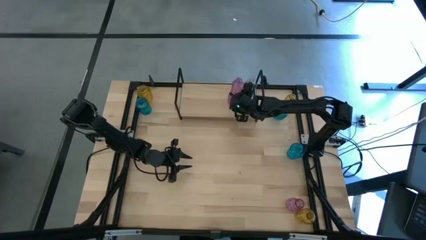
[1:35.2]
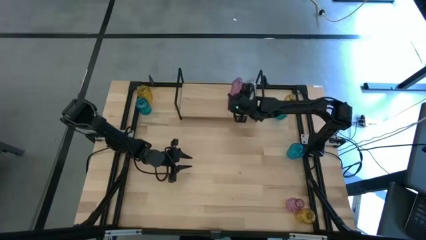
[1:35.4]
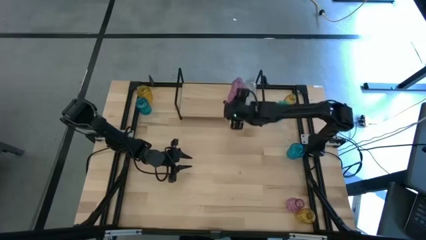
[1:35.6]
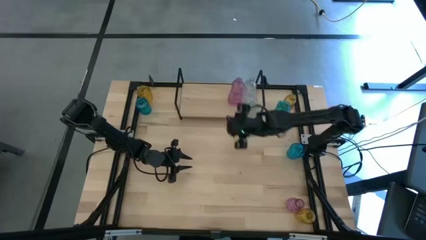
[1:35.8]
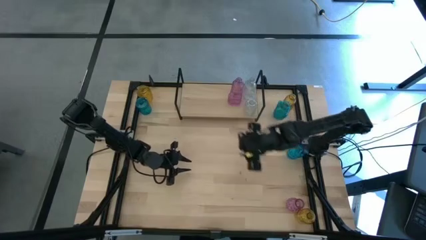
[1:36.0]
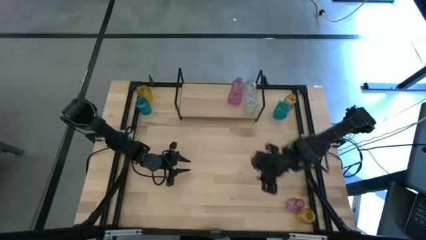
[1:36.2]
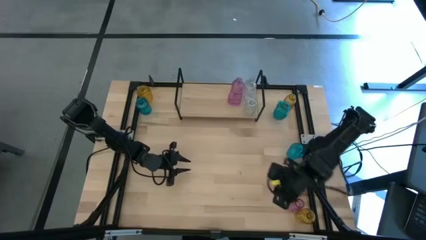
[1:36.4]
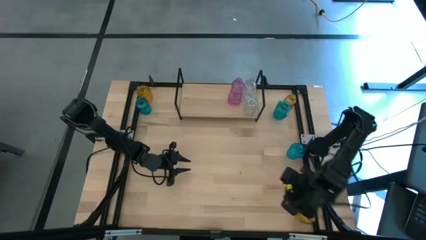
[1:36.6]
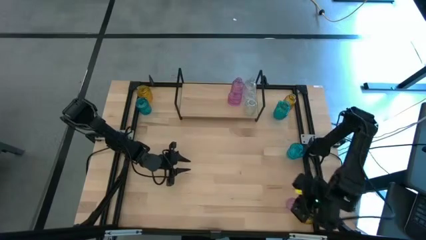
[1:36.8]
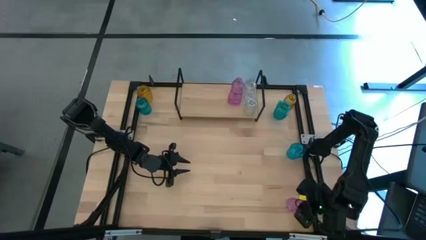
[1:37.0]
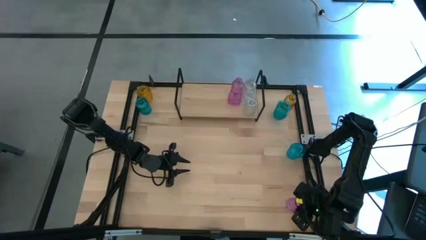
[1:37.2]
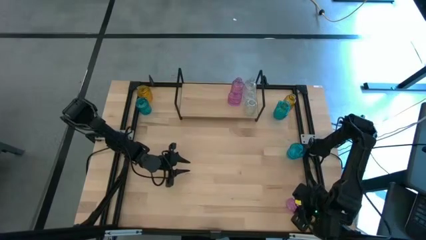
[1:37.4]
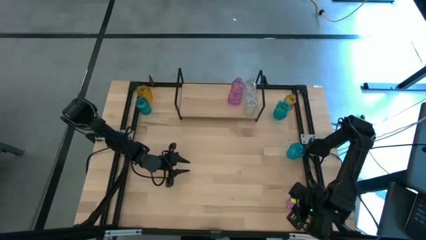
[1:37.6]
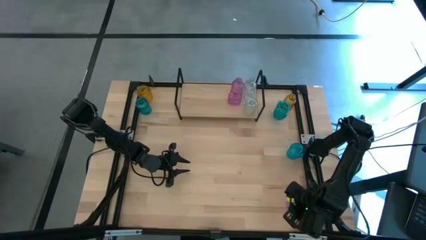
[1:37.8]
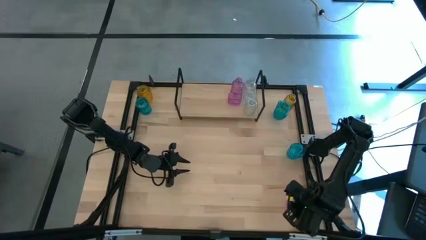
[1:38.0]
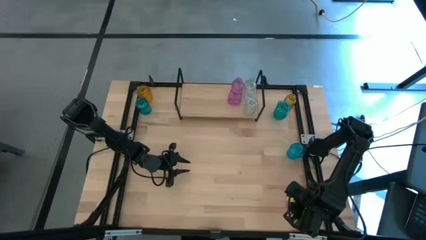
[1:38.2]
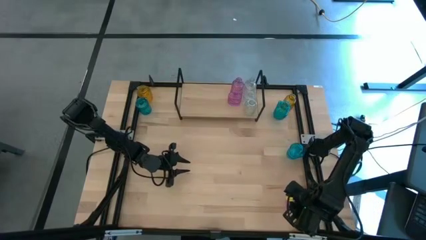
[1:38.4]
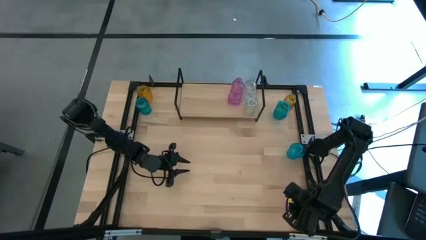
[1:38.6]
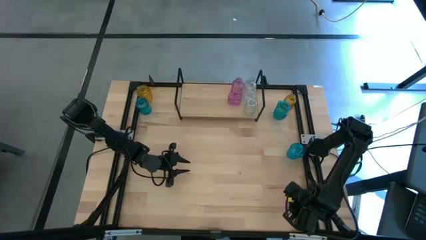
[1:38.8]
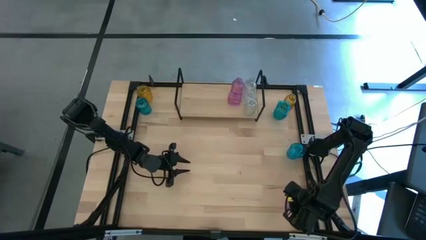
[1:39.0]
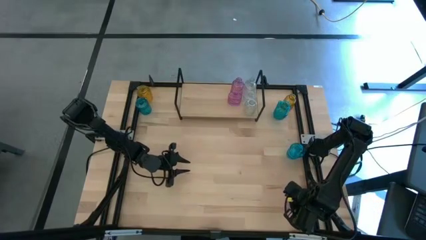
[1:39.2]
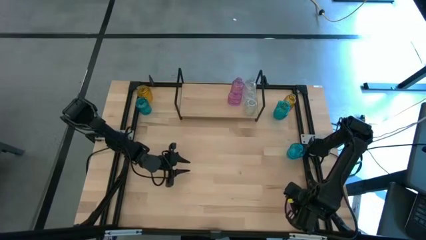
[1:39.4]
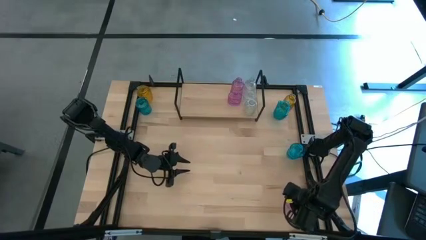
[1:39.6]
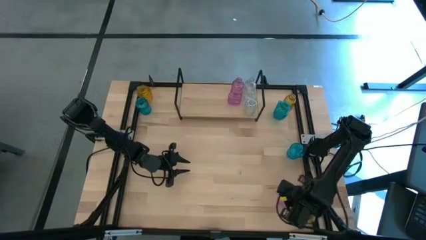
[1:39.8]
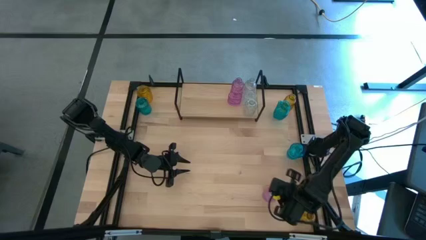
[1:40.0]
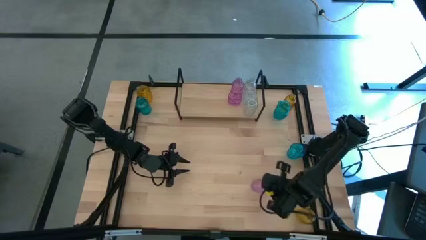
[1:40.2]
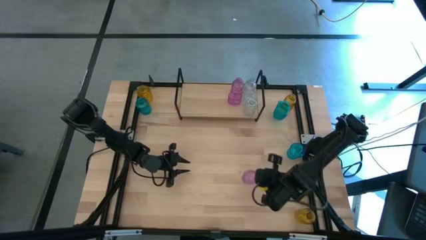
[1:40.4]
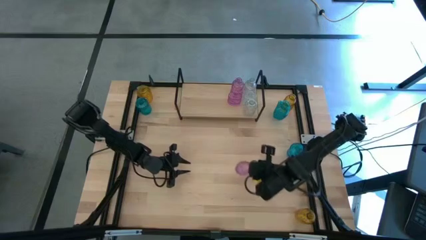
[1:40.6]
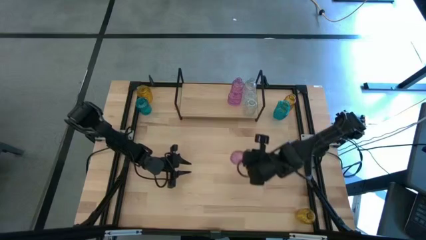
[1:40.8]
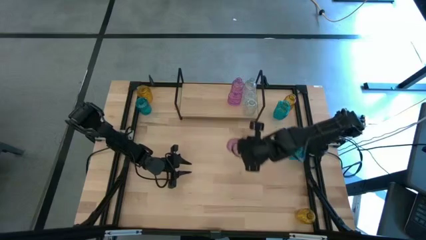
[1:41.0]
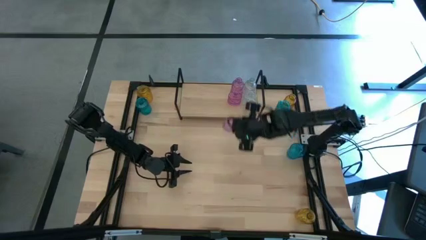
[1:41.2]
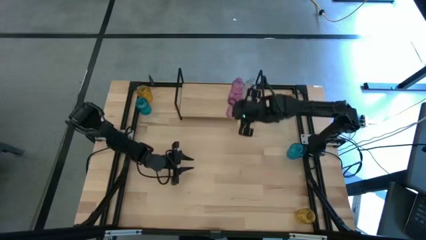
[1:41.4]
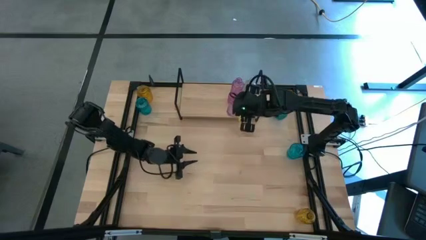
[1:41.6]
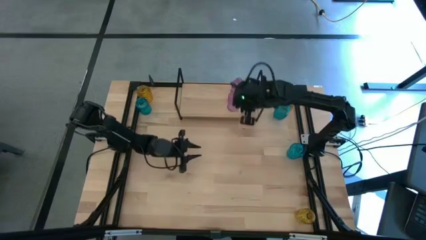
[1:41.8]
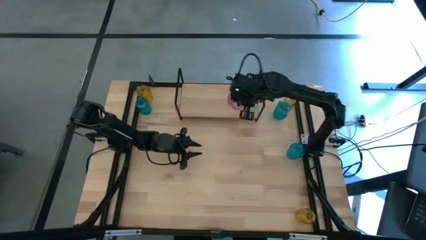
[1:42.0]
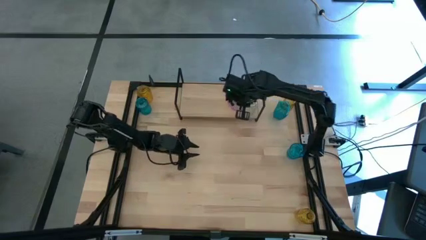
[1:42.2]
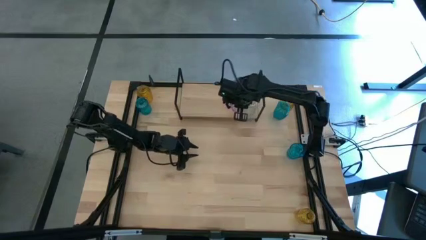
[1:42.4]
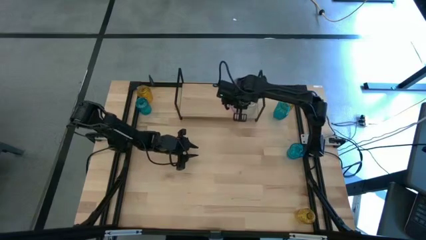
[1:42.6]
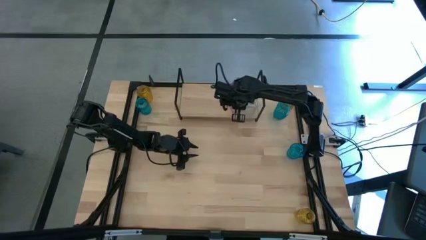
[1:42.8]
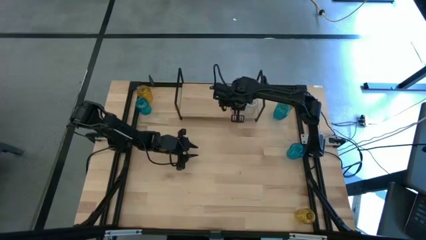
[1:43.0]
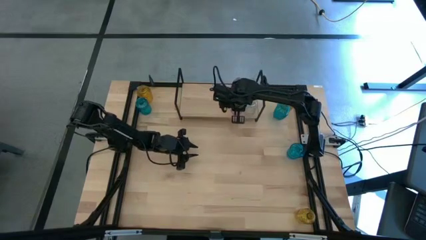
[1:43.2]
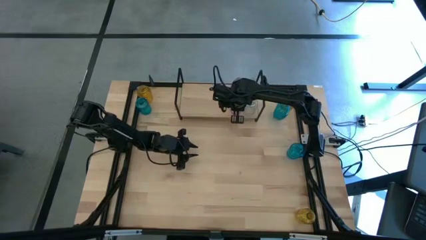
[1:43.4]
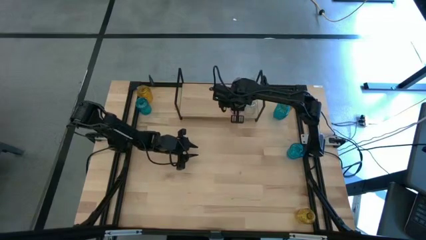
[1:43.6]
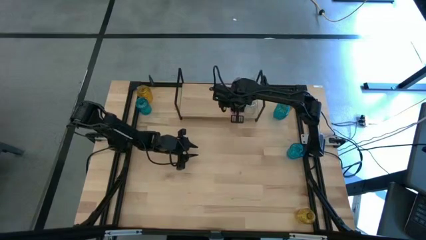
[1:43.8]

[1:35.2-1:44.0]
Task: sort vases onto shelf
Put the pink vase on the shelf aligned with the other pink vases

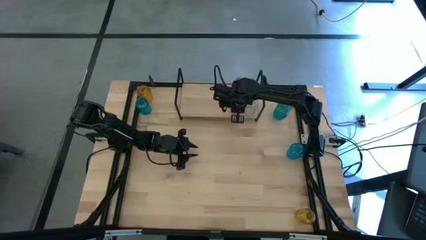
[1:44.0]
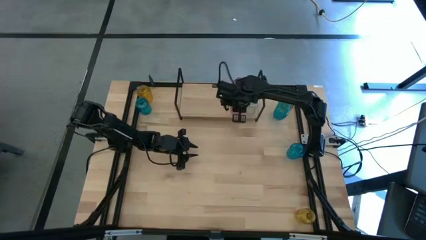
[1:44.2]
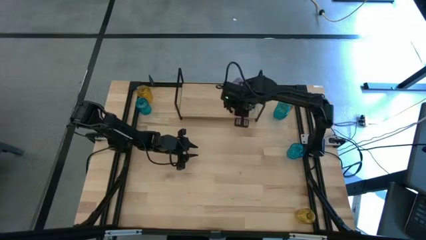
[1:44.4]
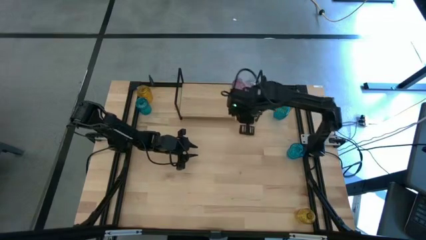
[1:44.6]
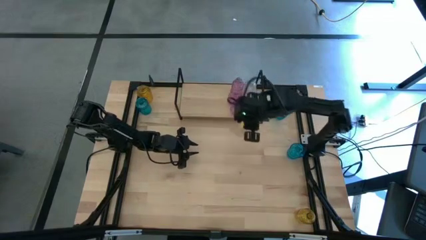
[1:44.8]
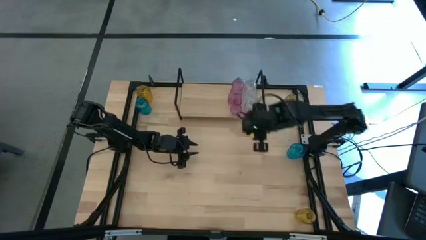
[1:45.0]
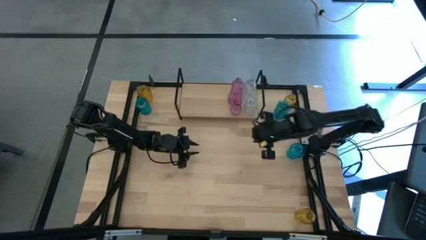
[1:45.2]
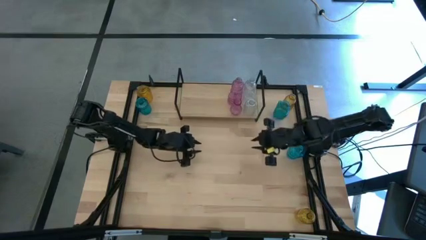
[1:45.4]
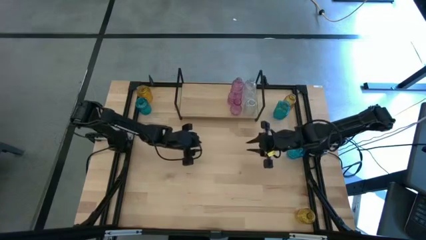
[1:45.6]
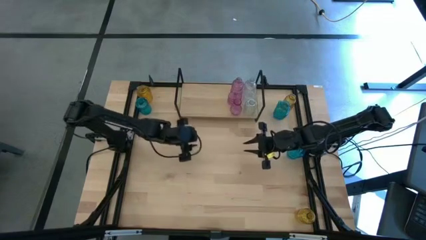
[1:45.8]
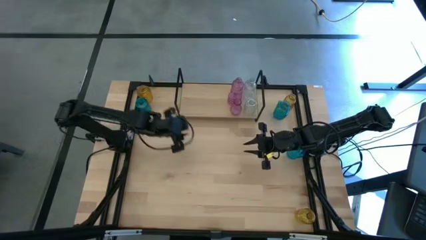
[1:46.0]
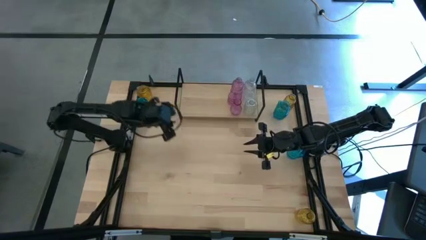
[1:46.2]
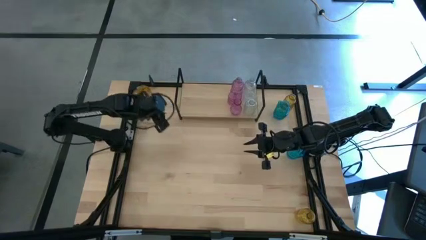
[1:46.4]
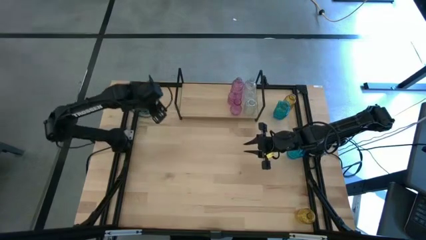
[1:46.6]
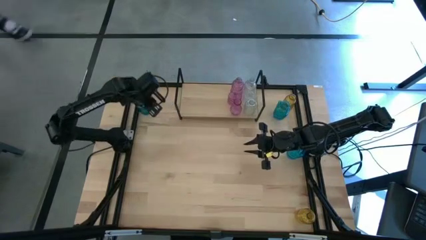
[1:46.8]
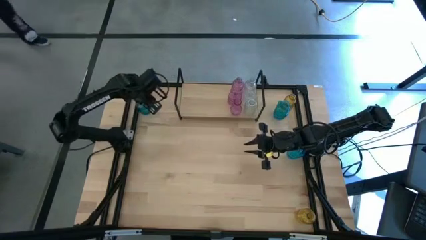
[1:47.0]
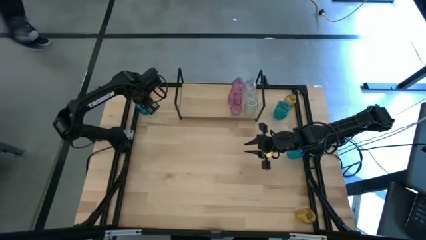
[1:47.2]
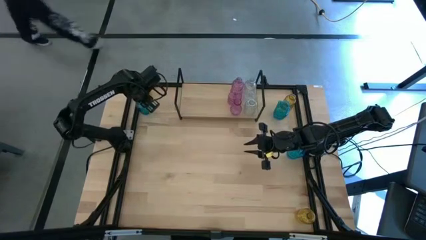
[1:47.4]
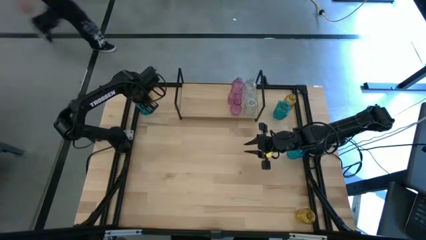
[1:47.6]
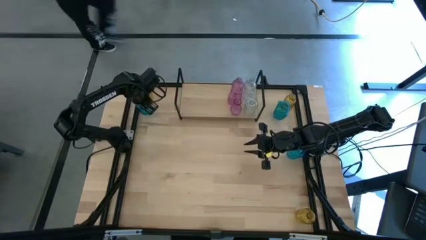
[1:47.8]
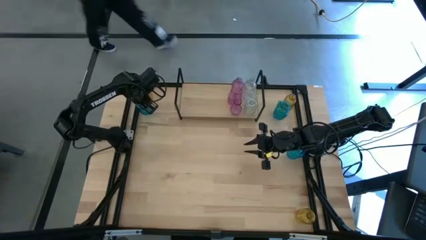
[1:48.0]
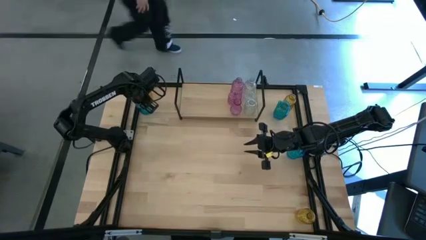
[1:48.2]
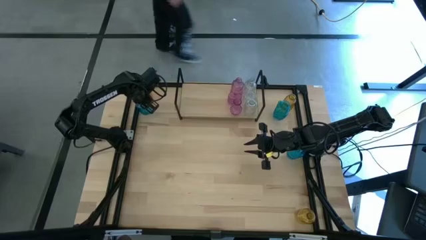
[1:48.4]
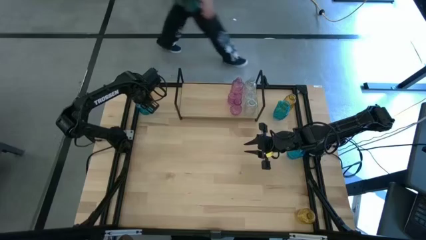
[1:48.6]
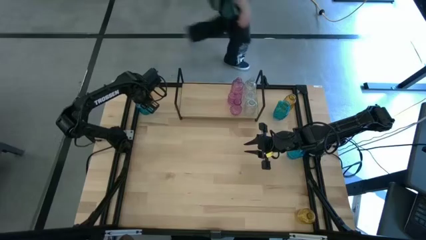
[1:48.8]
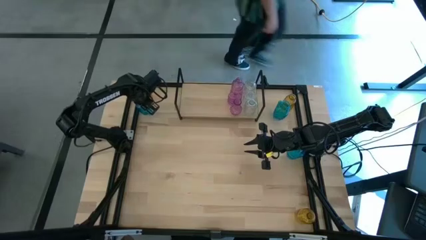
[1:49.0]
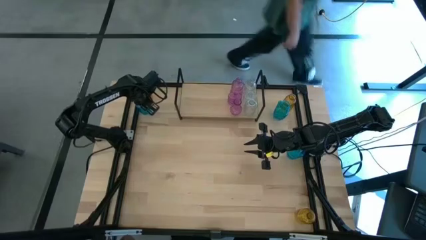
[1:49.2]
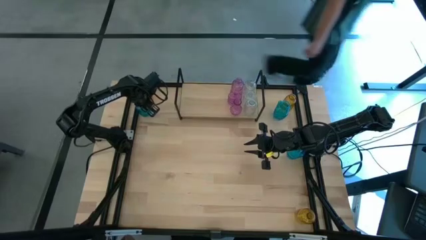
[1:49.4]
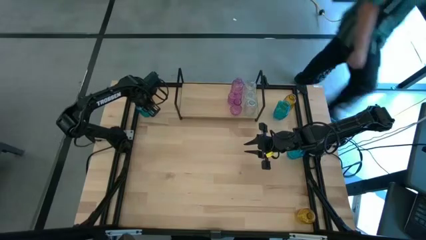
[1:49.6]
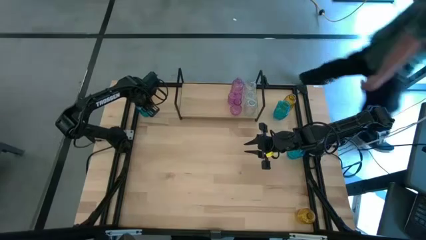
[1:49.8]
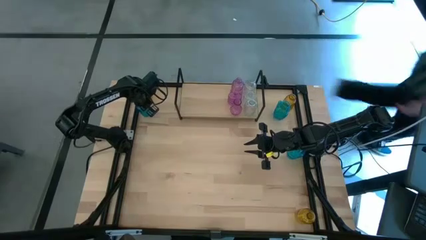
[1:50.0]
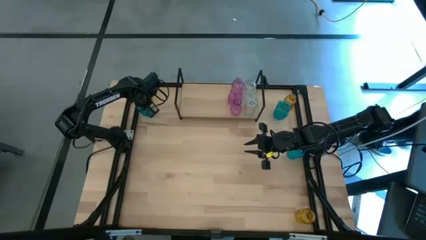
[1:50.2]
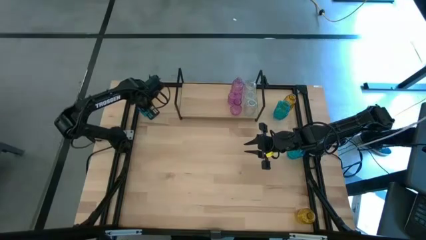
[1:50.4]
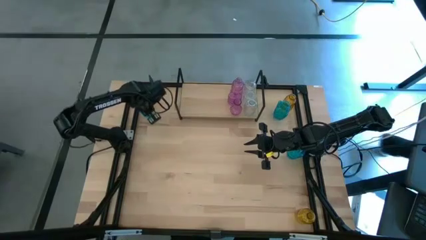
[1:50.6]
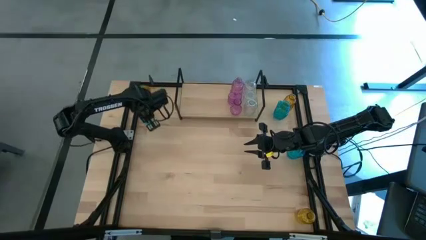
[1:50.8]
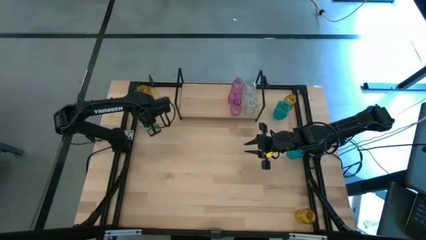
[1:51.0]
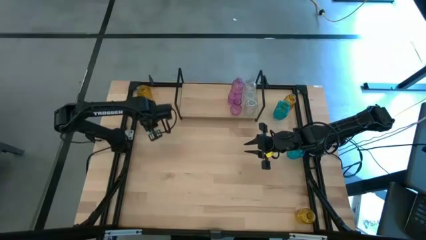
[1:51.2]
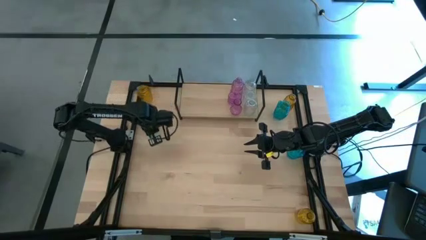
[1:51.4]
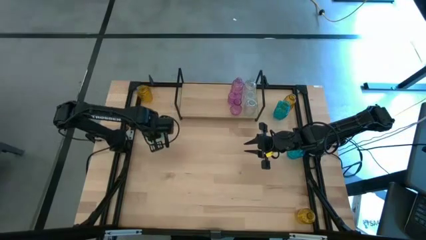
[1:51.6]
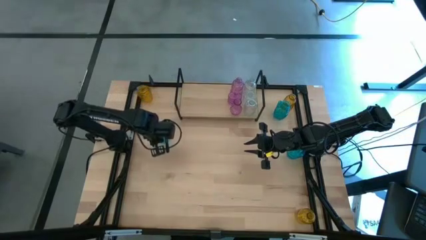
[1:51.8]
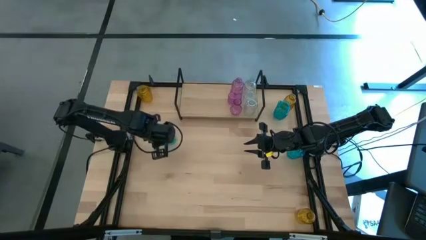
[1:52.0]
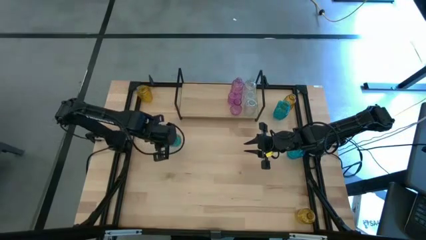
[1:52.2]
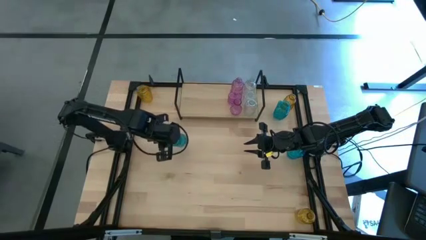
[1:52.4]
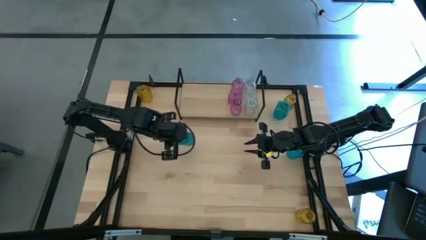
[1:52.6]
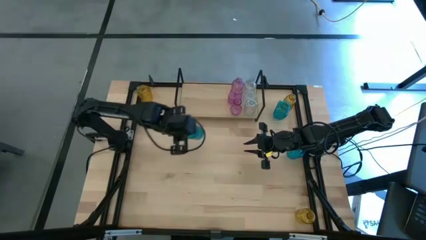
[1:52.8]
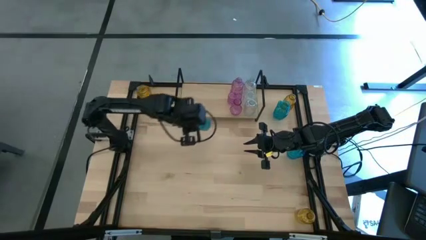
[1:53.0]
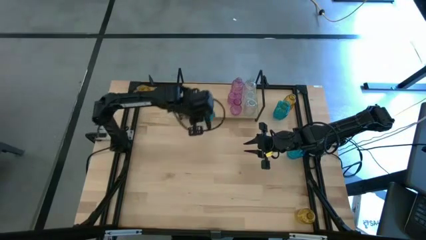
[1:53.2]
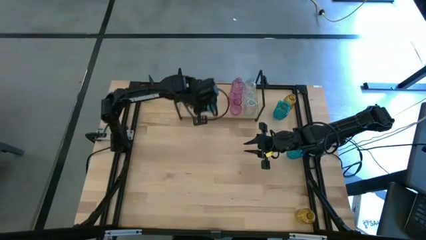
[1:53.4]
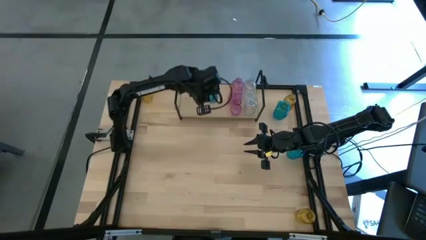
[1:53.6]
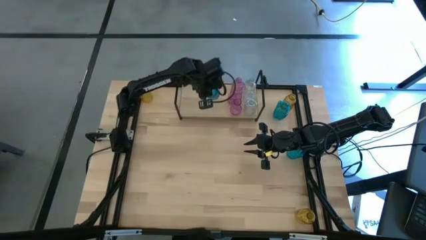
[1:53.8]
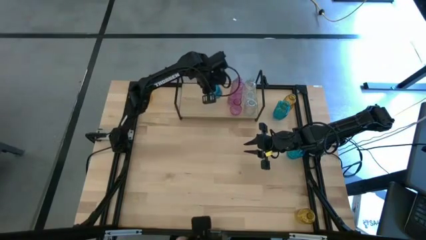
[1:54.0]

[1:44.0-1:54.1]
Put the top left blue vase on the shelf
